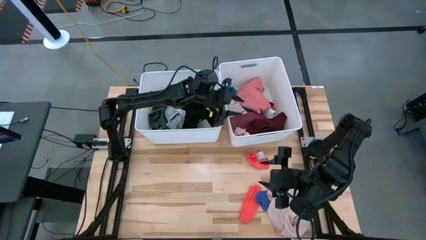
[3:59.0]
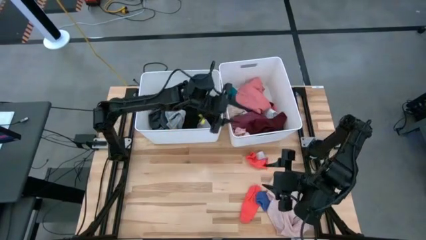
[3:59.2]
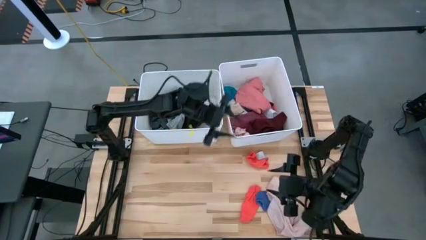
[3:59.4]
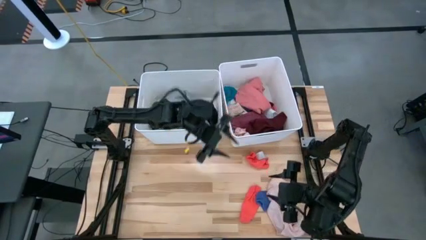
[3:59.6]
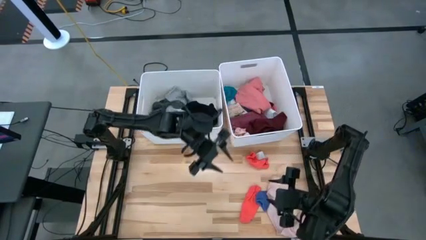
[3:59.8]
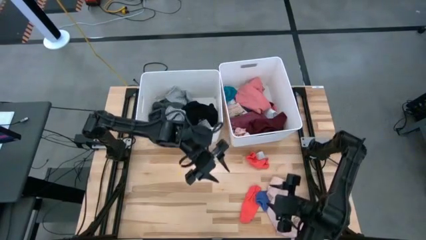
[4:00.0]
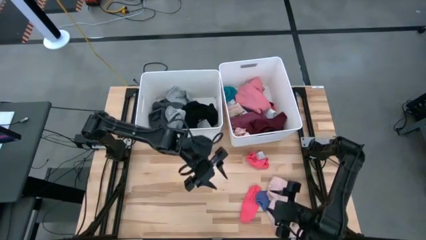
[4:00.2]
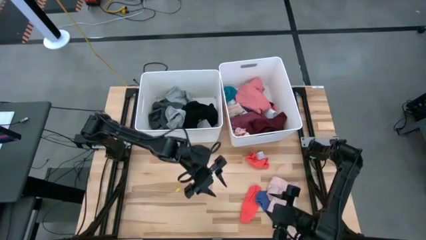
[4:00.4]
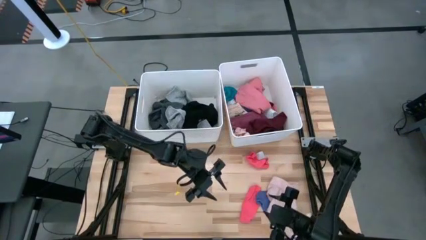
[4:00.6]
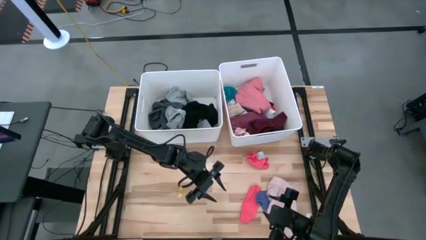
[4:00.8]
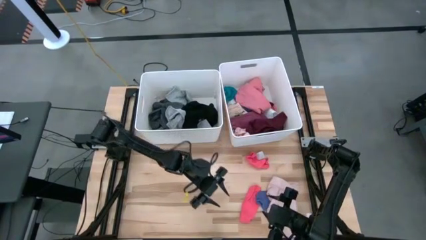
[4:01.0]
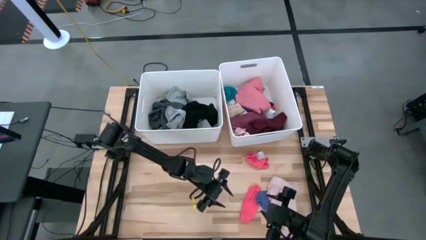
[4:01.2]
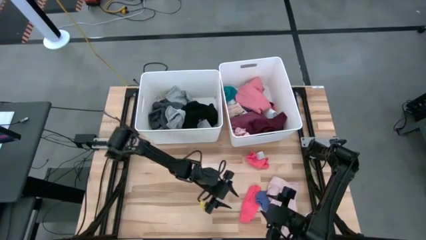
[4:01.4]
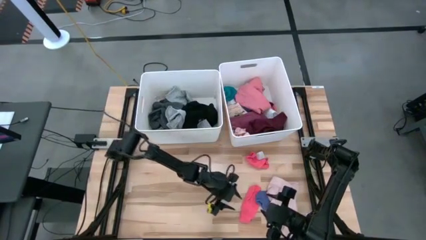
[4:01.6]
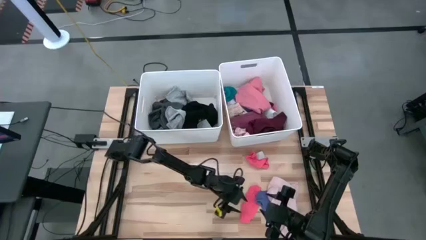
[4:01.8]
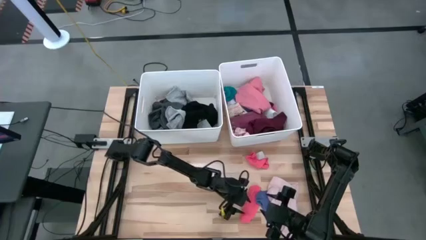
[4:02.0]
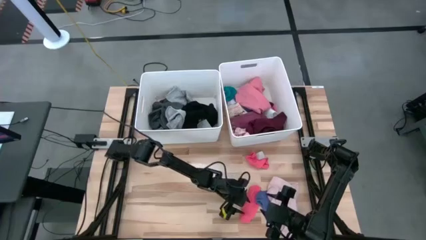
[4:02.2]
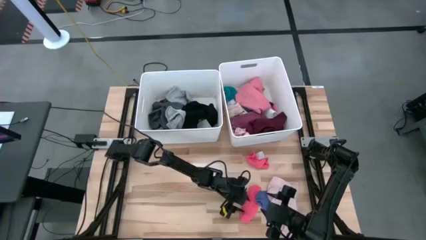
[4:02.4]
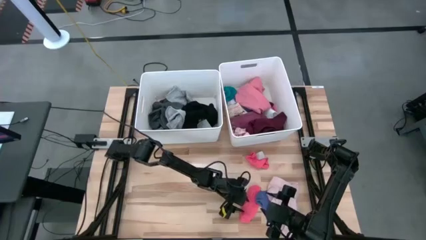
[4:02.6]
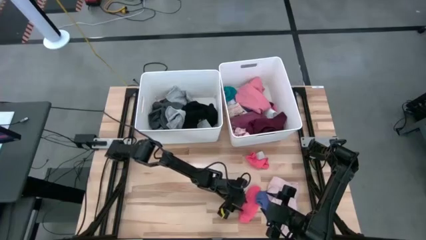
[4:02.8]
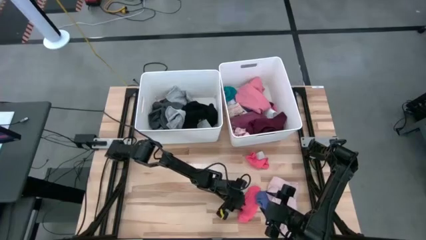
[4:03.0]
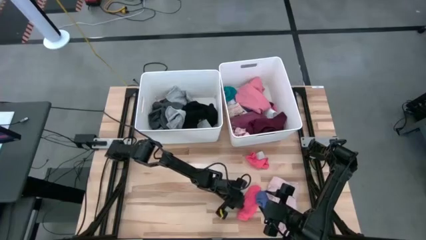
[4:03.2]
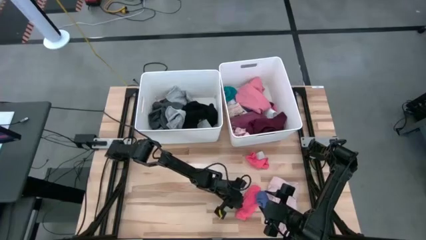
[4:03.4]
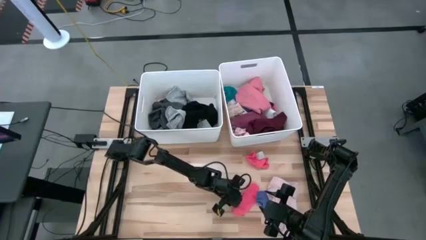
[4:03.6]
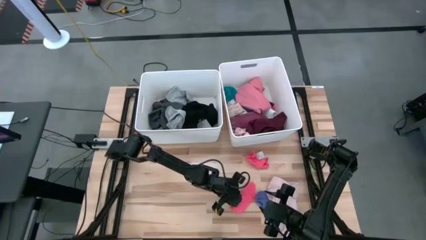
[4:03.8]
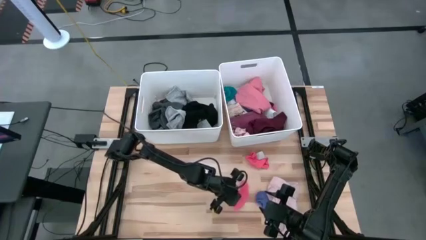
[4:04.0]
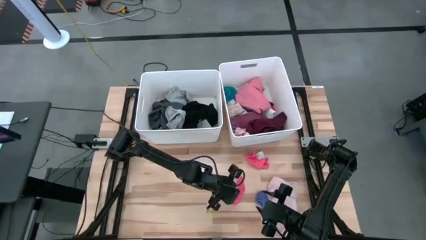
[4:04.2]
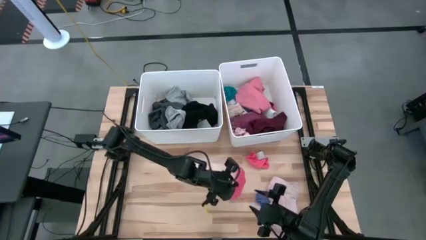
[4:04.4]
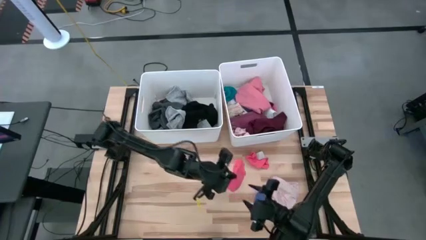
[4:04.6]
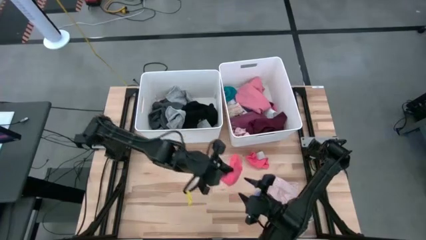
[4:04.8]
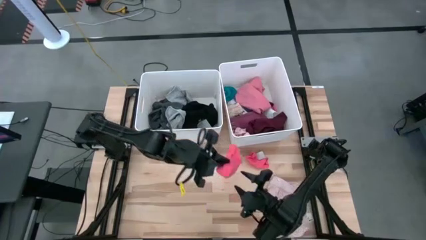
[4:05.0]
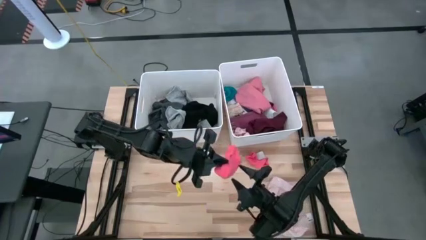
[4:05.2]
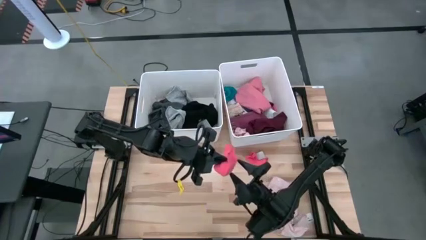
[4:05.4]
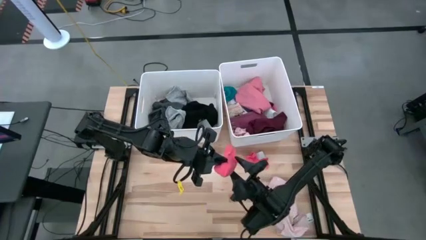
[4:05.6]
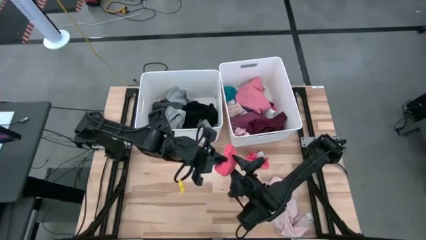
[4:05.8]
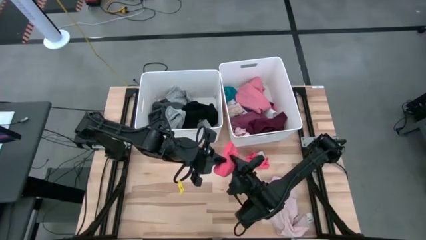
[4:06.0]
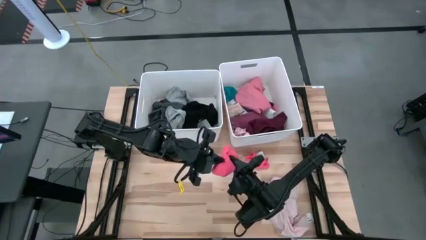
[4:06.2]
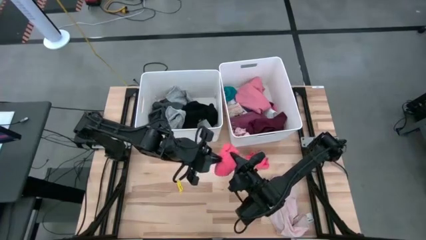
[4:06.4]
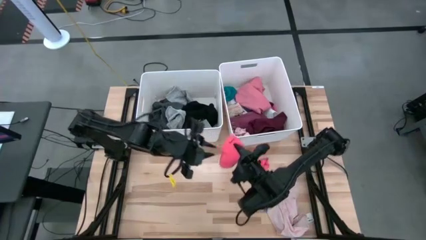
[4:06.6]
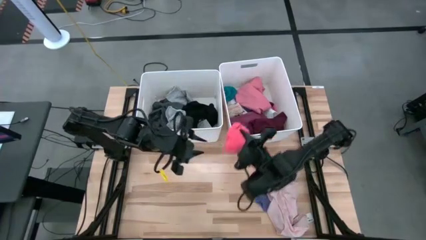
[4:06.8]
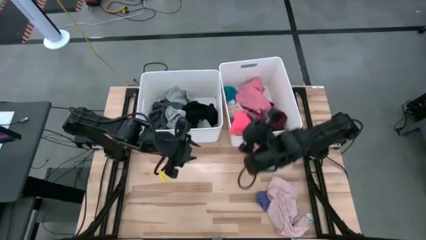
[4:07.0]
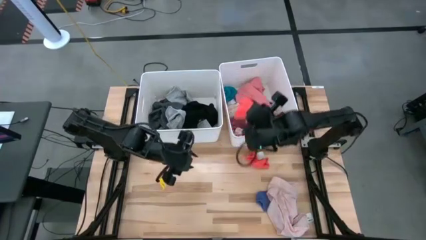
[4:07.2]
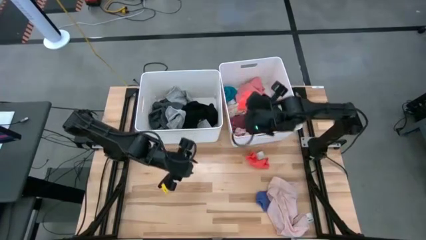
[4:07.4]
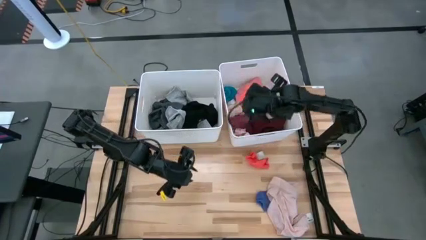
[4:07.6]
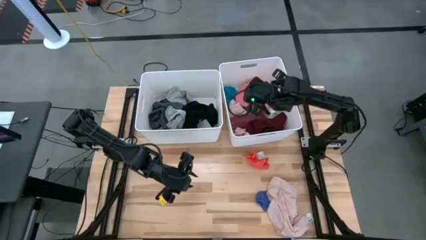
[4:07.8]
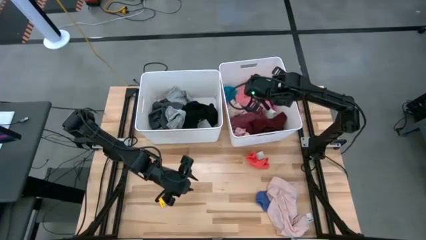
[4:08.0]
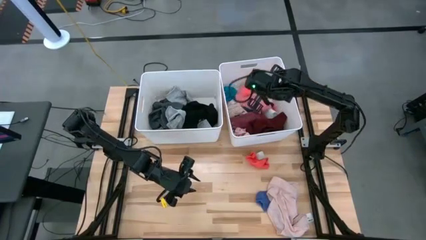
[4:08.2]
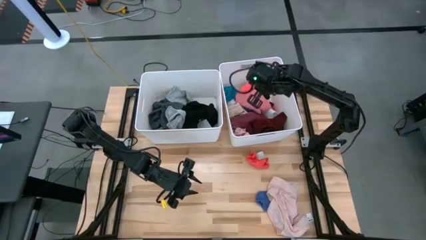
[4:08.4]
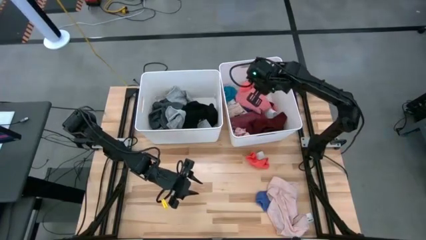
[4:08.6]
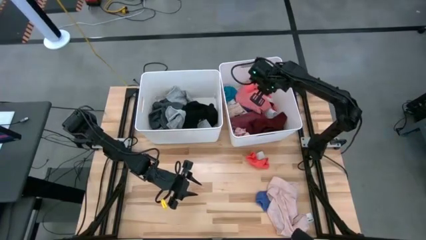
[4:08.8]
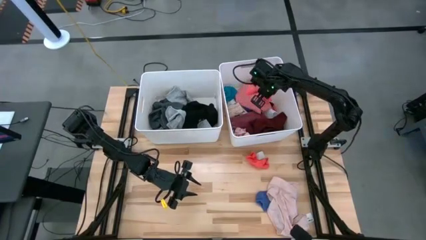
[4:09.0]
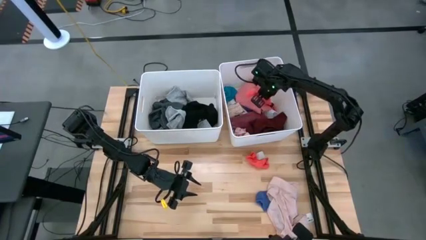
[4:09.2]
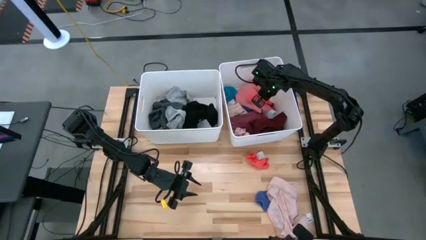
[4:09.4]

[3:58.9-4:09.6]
Task: Sort clothes
Put the pink sock into the right white laundry organizer

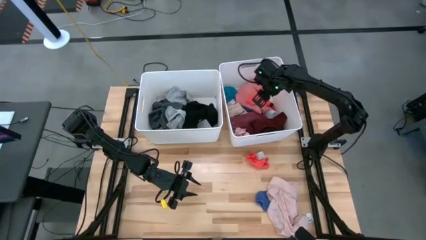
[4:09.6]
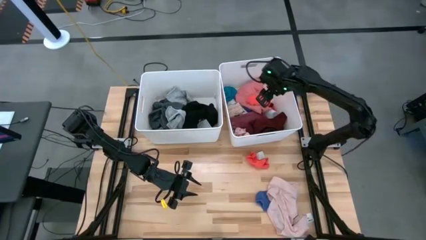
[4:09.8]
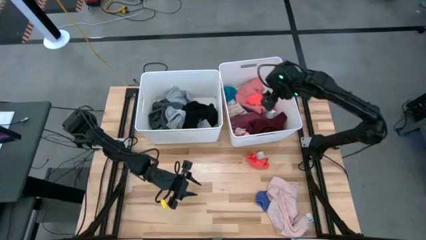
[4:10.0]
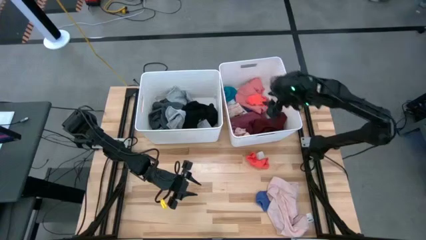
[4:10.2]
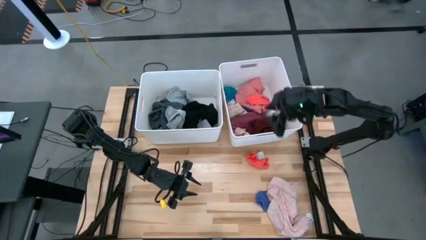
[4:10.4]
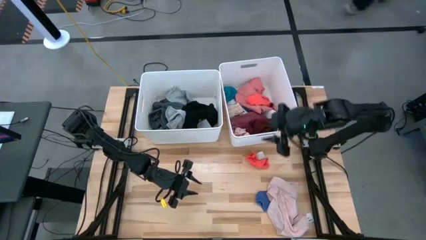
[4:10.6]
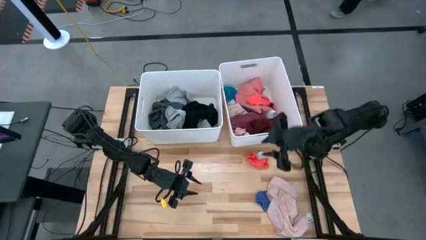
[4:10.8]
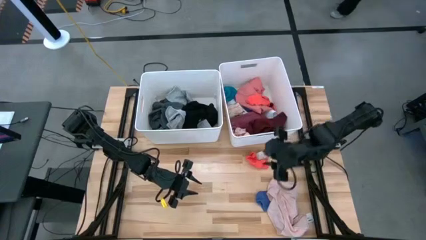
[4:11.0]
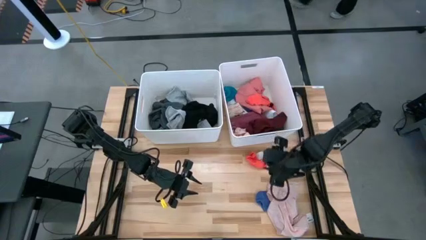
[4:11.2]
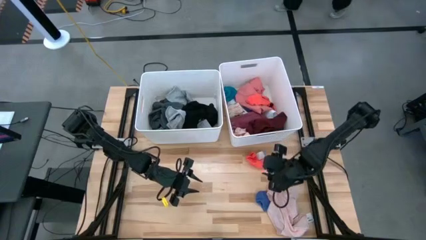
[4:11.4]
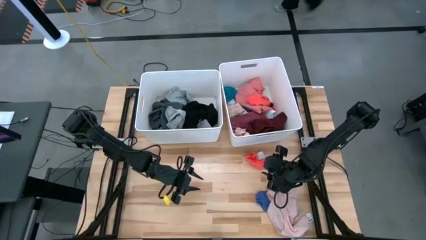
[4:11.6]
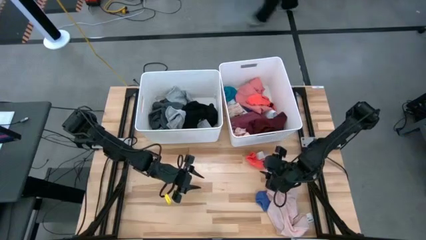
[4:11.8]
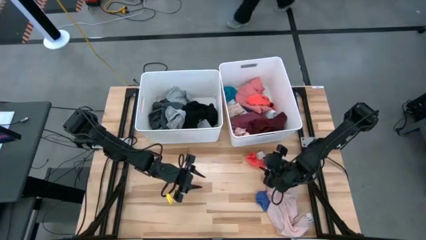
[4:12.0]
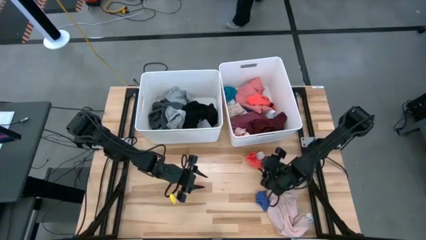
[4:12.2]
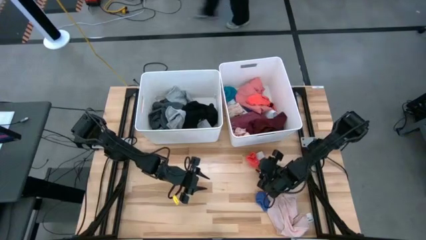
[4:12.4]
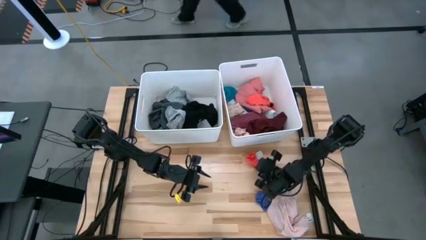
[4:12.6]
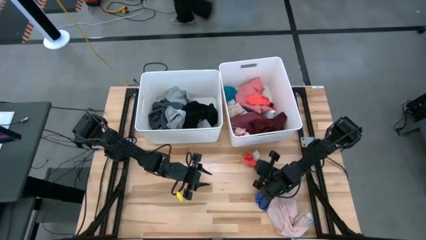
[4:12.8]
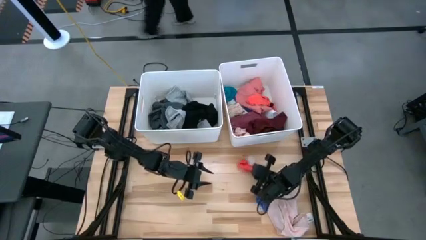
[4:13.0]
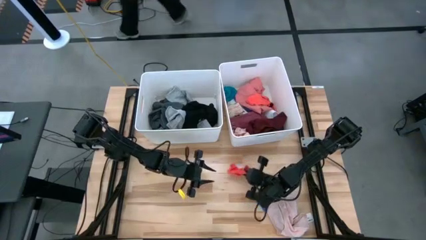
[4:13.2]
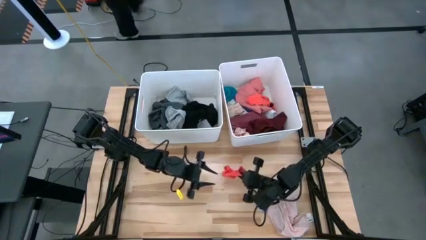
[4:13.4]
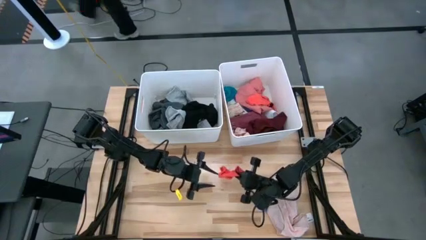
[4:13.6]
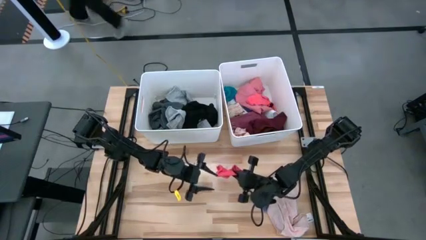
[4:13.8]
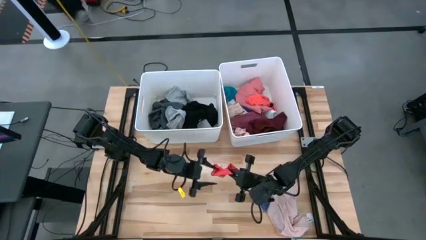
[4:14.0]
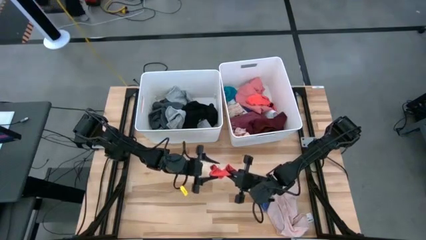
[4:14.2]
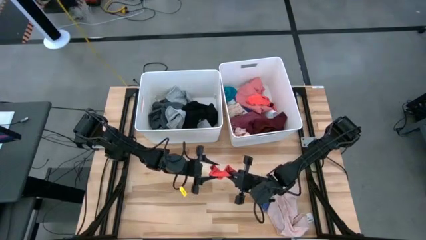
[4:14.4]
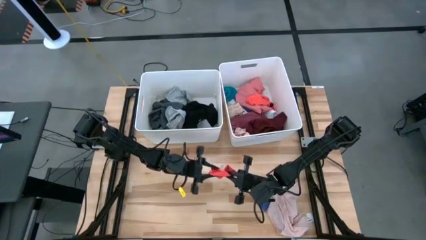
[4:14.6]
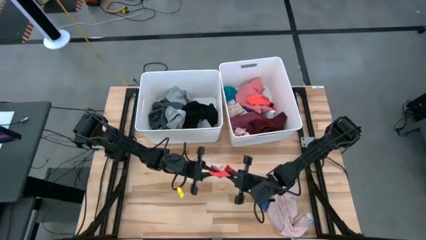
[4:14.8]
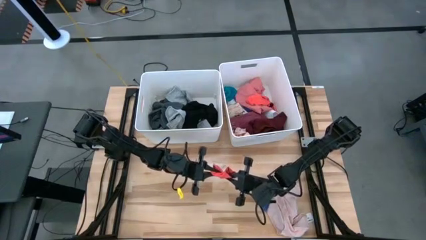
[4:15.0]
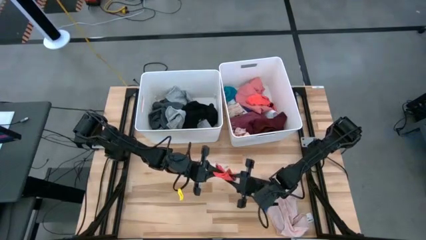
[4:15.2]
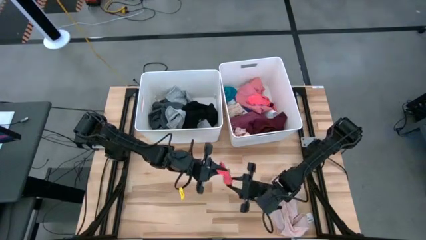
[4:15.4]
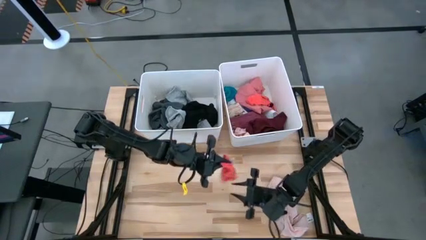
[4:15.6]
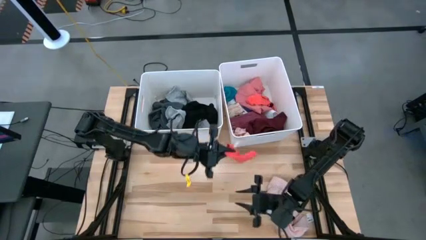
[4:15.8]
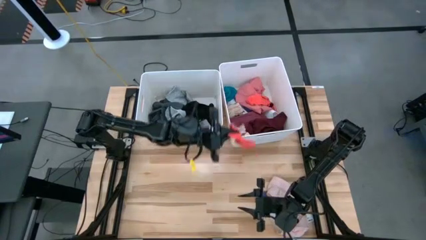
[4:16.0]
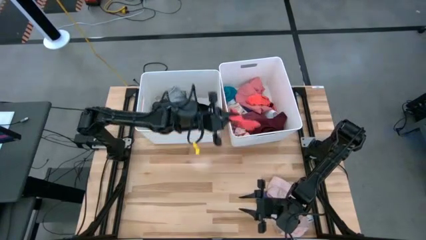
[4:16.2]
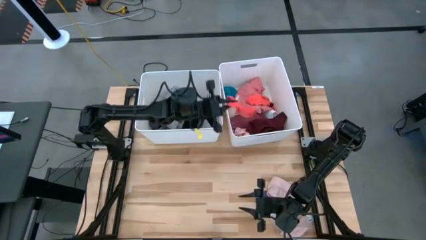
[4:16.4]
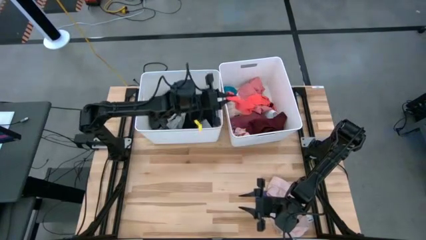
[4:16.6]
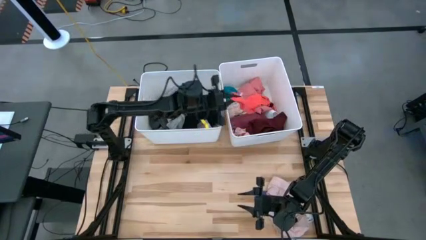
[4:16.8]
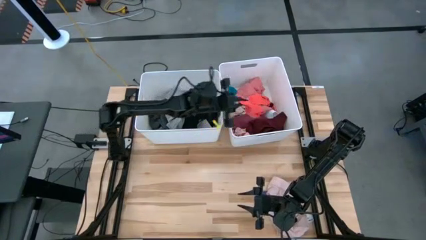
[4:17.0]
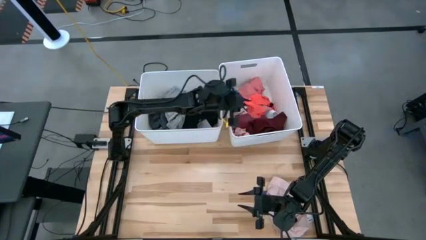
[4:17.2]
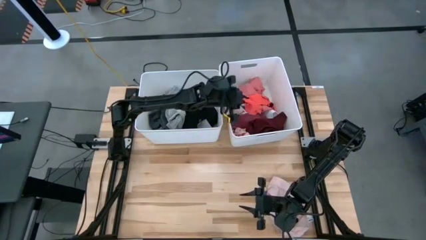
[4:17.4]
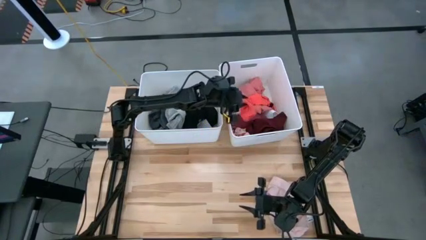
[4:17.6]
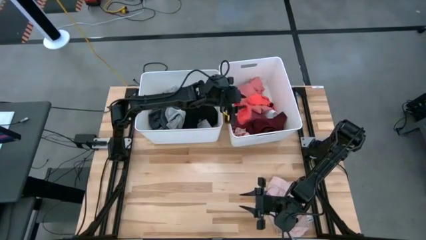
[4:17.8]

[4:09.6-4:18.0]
Put the pink sock into the right white laundry organizer
